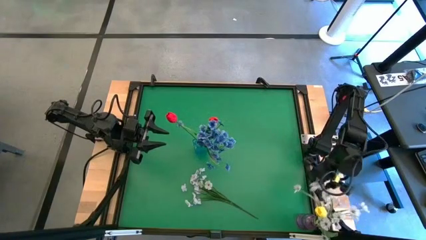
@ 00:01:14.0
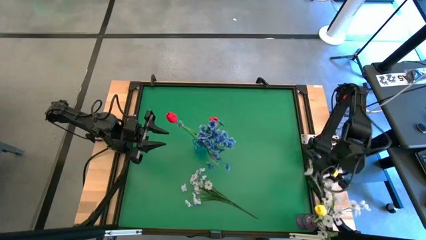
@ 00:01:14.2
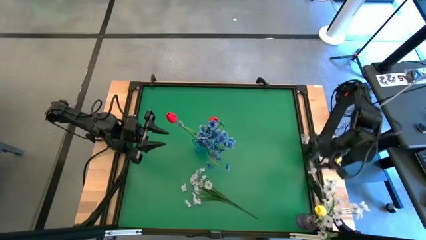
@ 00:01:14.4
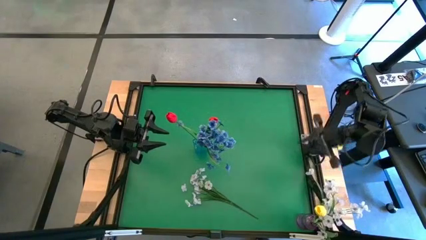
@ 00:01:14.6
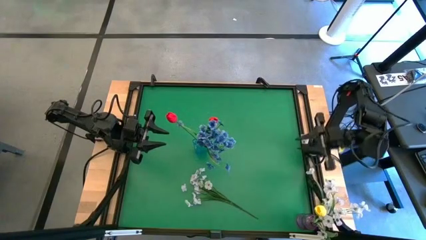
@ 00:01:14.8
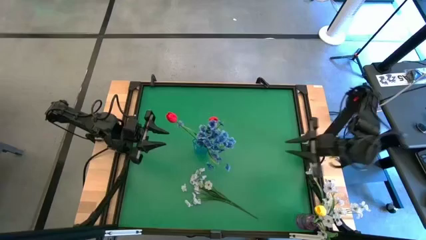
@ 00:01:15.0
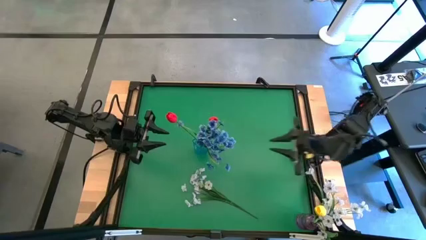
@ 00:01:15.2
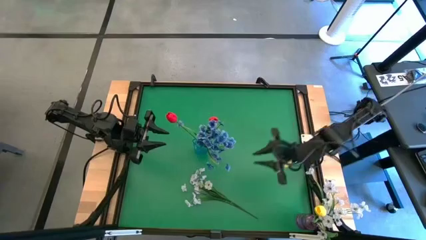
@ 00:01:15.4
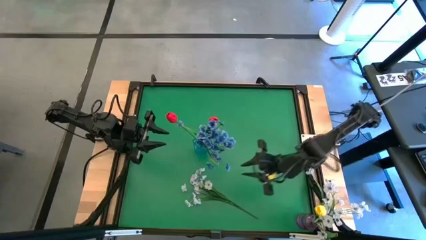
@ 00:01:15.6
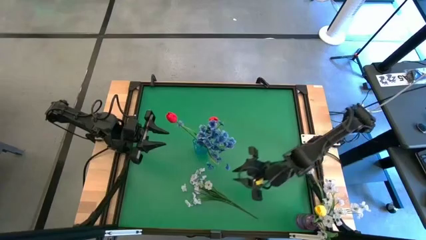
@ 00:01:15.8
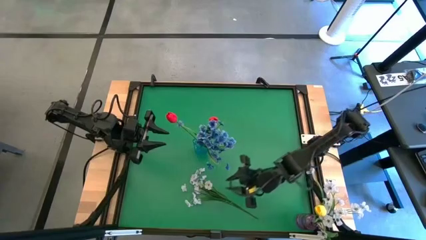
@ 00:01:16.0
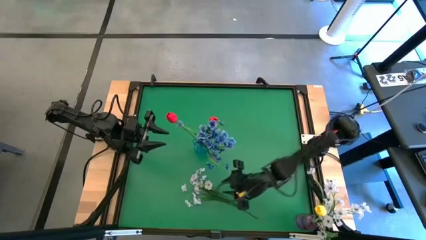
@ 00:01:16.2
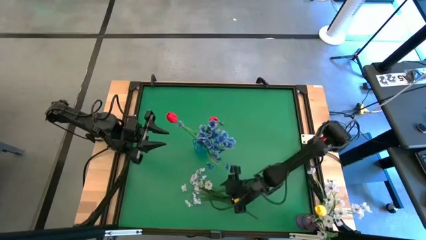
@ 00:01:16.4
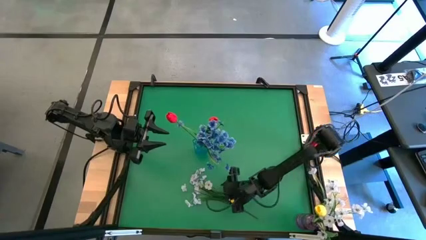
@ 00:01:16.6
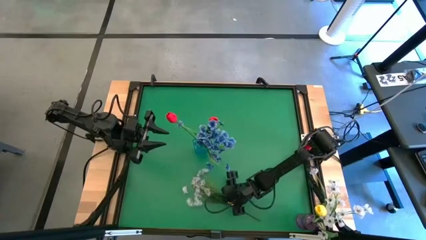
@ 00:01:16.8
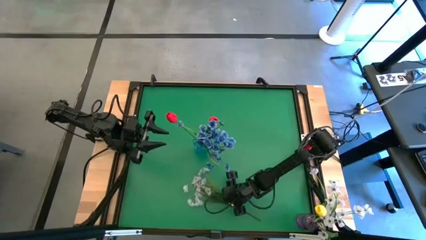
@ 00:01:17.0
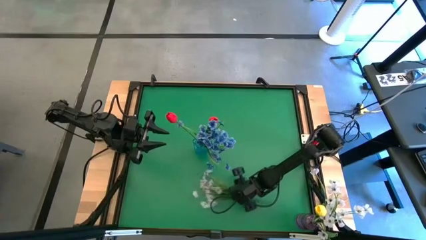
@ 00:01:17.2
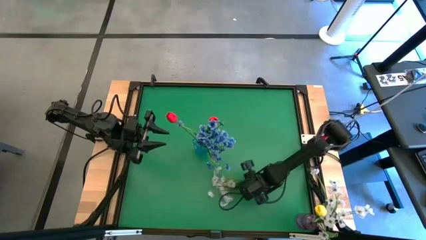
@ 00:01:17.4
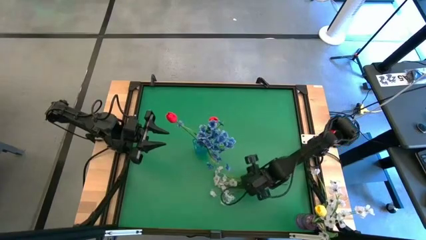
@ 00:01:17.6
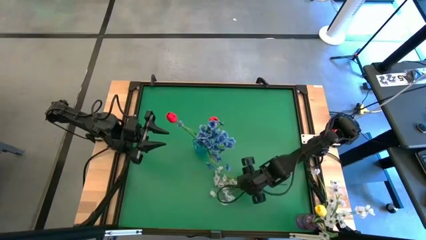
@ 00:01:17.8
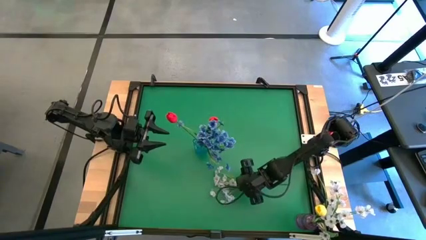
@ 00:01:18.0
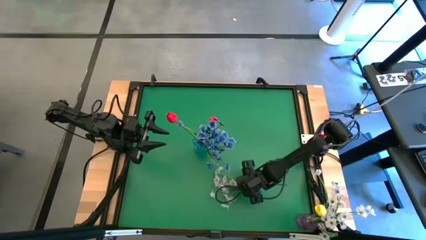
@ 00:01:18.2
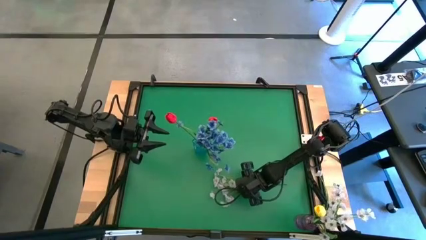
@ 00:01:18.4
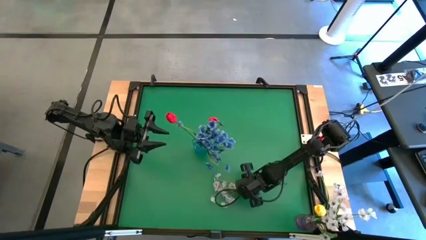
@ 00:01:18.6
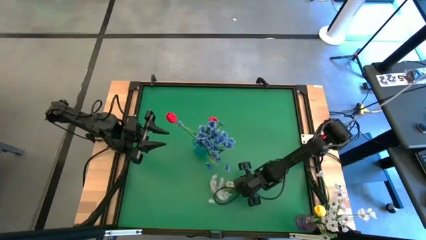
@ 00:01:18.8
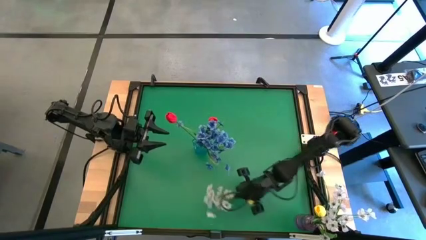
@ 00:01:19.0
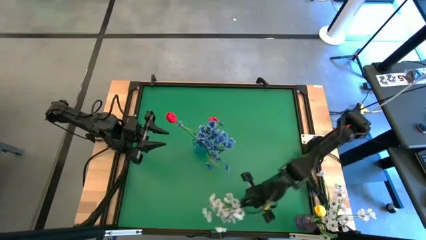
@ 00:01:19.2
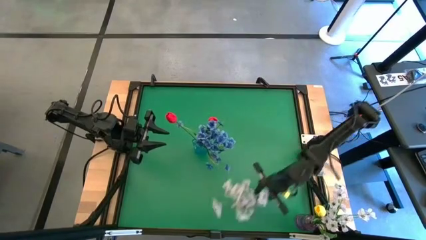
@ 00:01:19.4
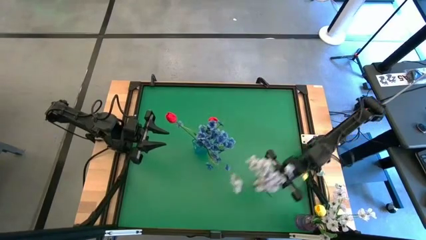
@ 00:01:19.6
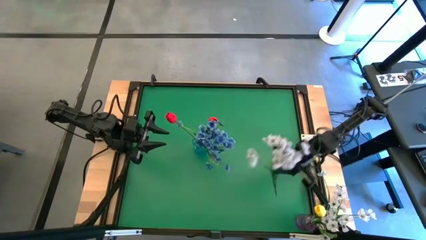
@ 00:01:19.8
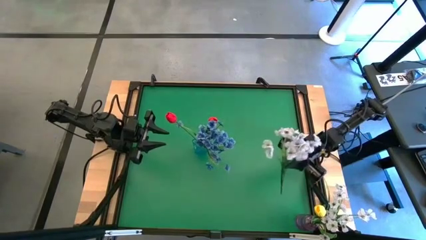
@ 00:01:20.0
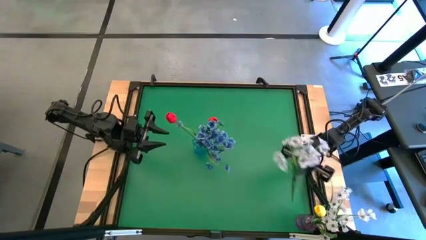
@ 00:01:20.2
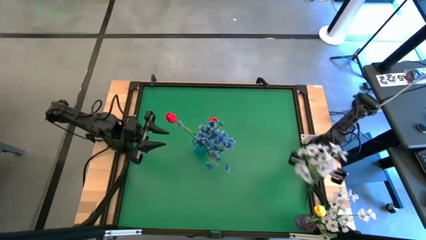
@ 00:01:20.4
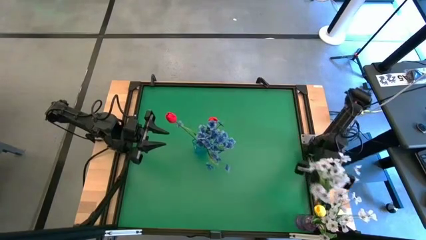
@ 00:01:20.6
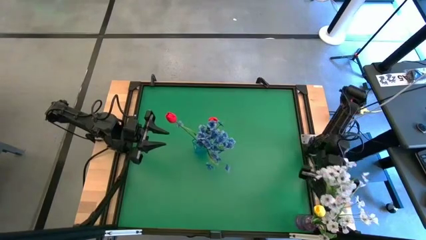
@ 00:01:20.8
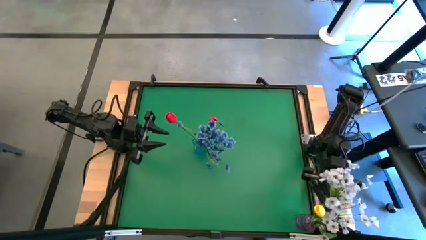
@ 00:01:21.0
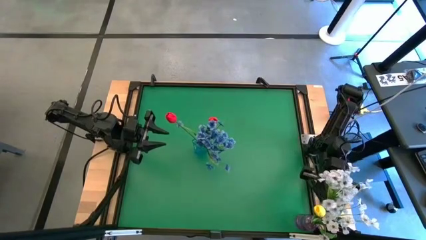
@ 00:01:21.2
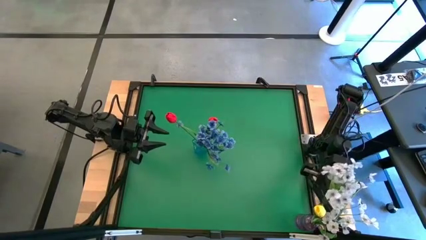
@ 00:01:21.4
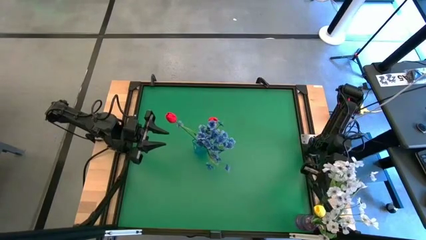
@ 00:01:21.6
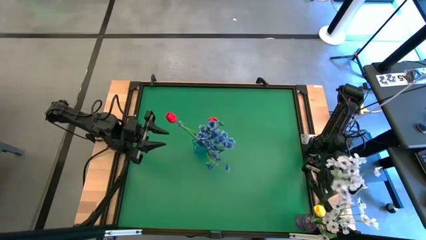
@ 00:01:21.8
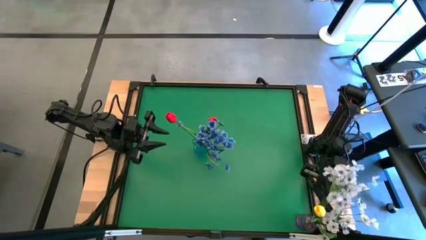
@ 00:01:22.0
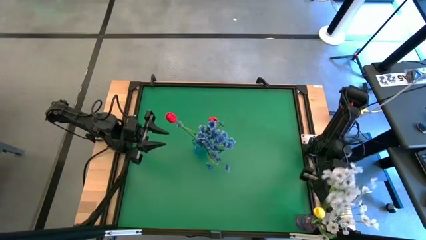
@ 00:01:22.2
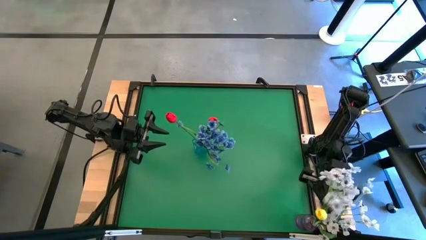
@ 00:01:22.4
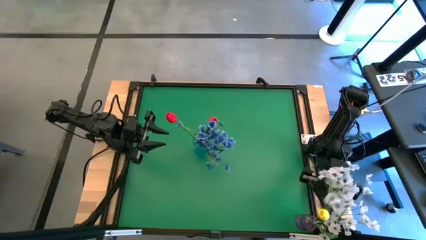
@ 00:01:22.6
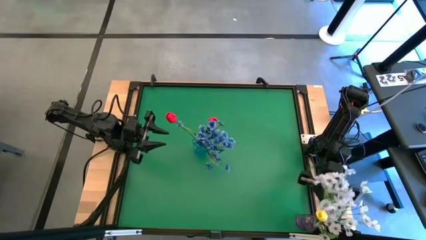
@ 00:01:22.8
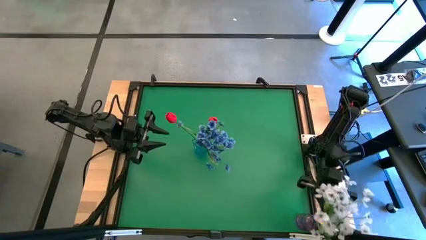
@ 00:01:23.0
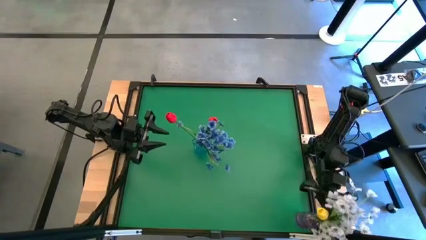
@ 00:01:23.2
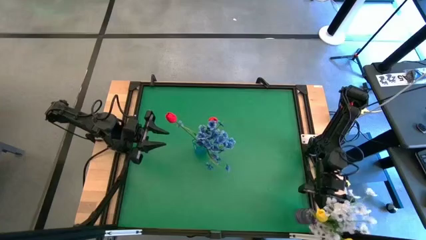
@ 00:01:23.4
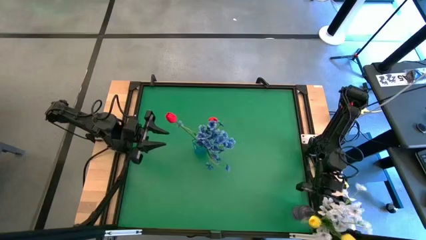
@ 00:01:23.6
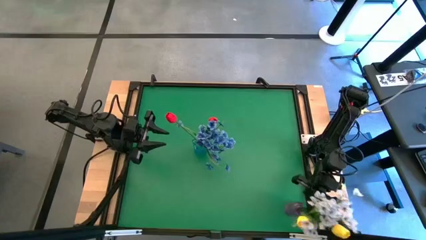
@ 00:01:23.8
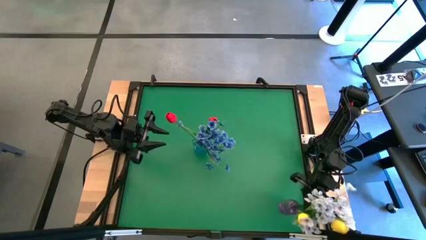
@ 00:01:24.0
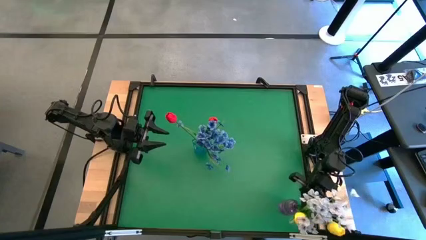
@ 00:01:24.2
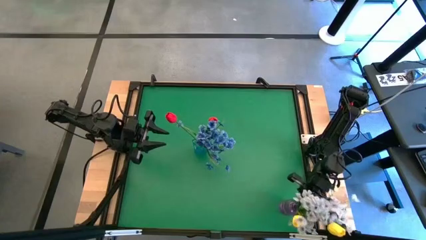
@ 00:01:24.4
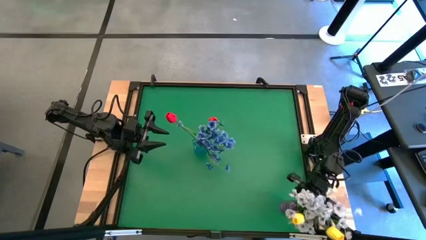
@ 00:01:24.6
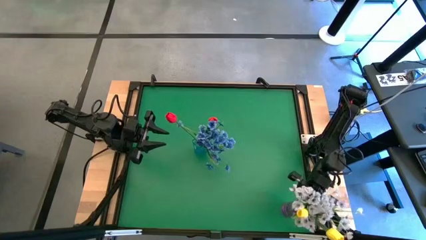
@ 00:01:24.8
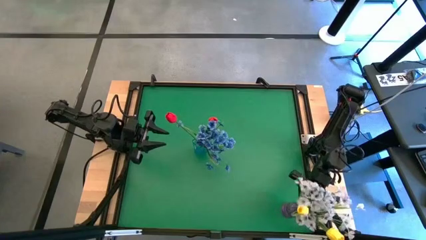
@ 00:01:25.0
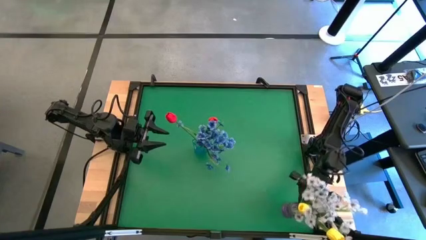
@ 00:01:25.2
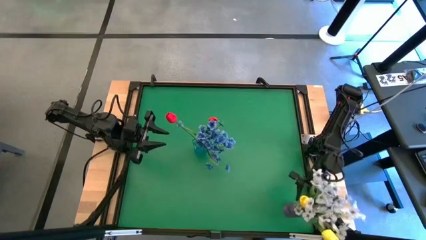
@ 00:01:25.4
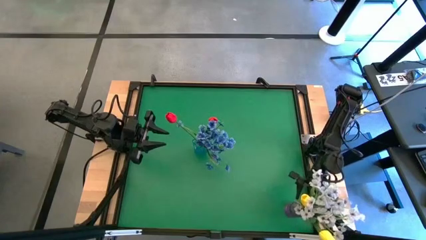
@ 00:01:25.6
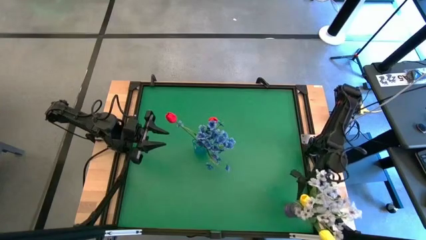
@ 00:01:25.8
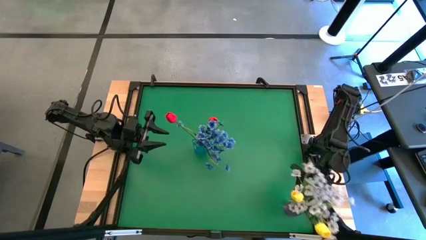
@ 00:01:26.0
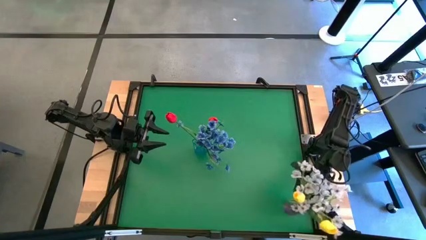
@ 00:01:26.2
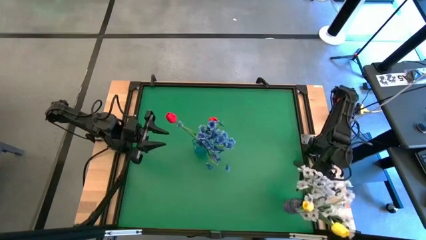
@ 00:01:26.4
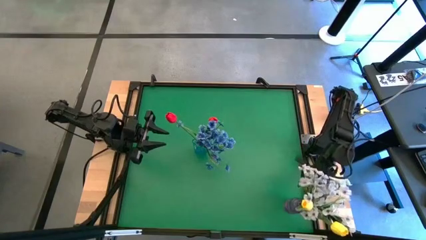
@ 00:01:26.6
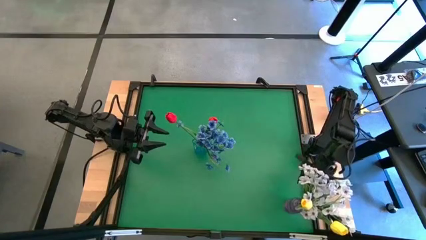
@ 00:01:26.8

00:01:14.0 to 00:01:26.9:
Task: Sort flowers into vase by color
Put the white flowers into the purple vase
